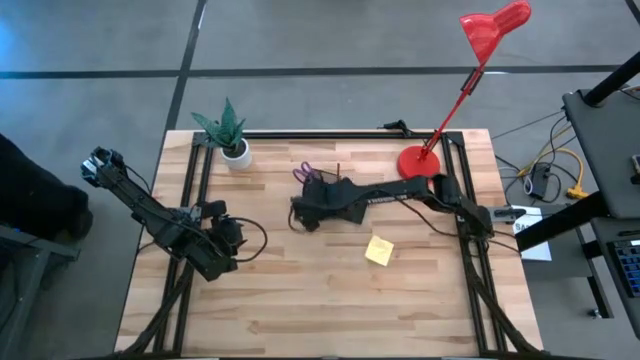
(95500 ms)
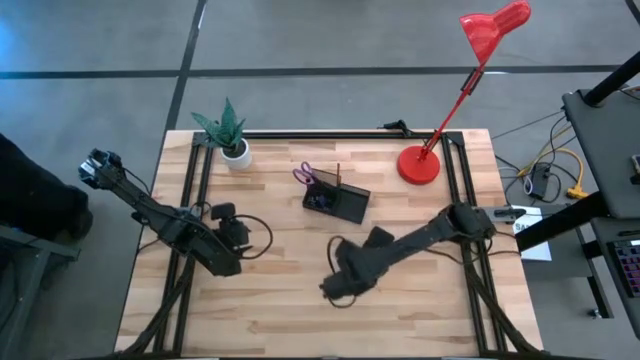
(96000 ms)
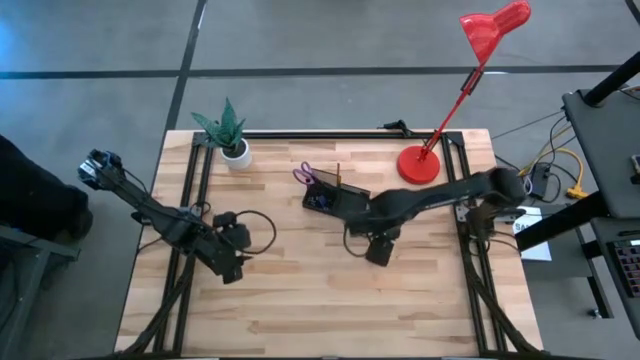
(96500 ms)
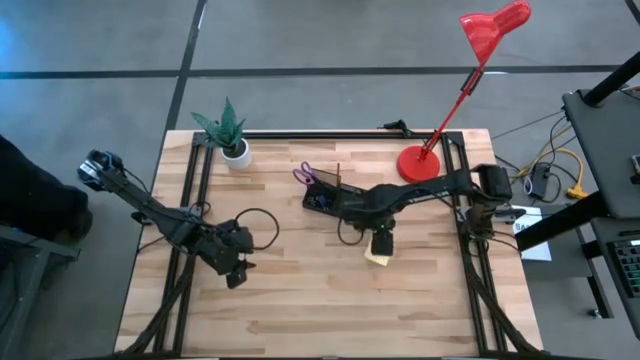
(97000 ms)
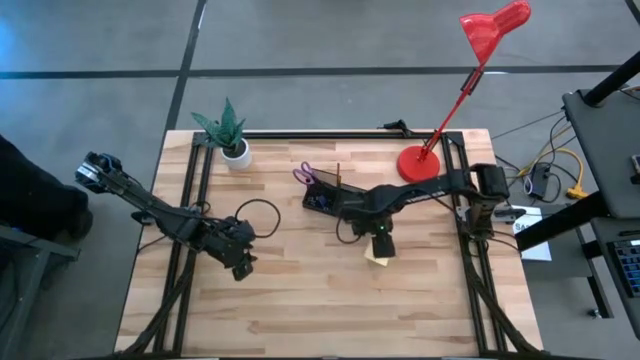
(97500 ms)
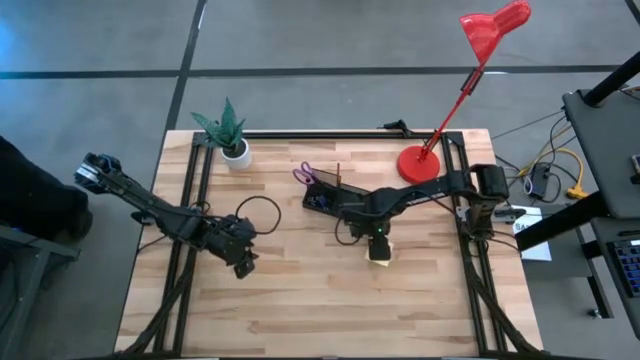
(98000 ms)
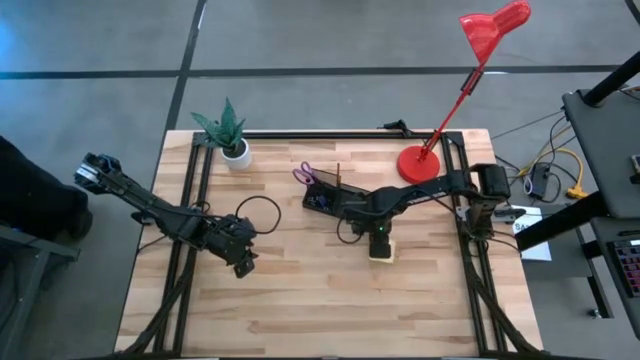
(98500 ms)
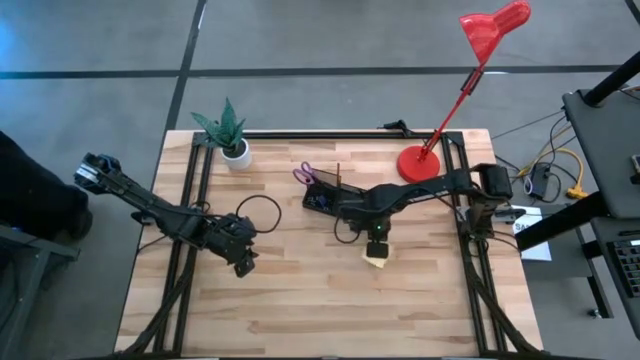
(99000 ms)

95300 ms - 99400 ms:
Task: Pick and place office supplies into organizer
Put the yellow sticky note into the desk organizer

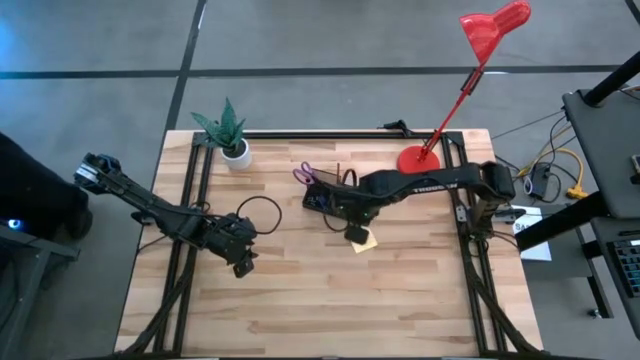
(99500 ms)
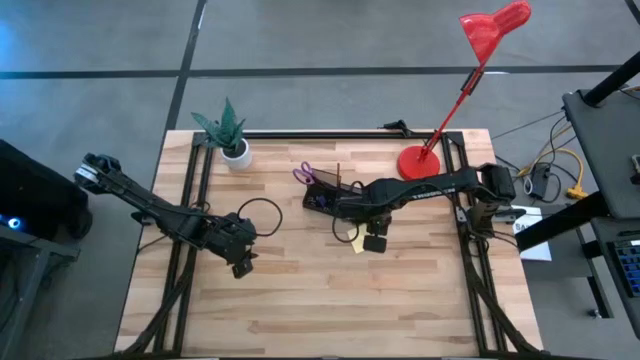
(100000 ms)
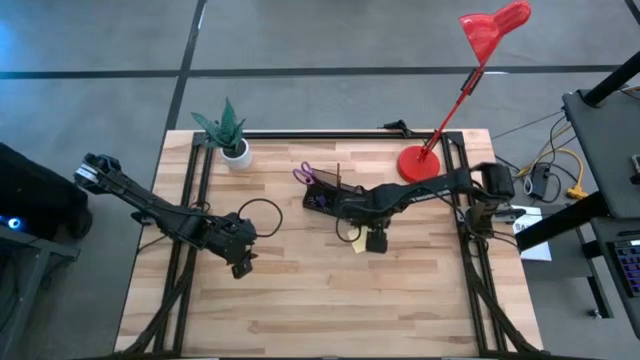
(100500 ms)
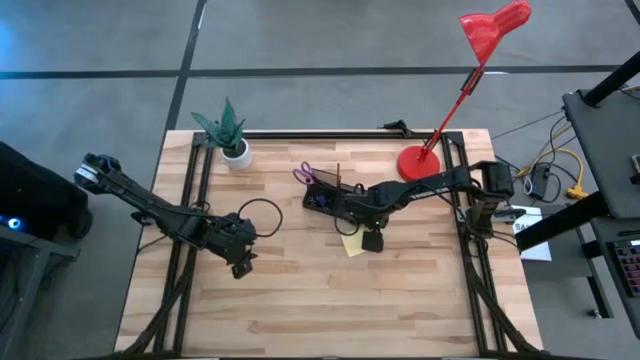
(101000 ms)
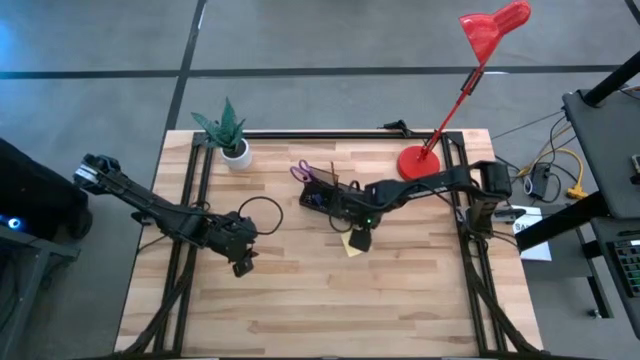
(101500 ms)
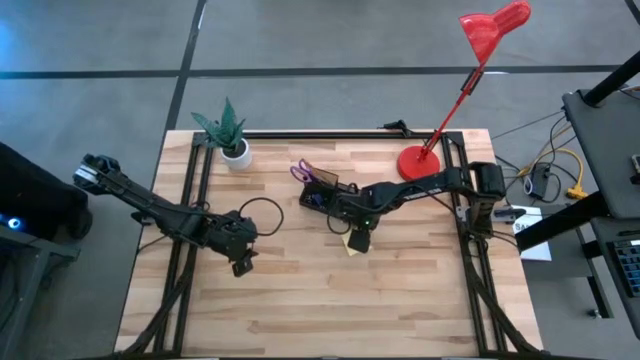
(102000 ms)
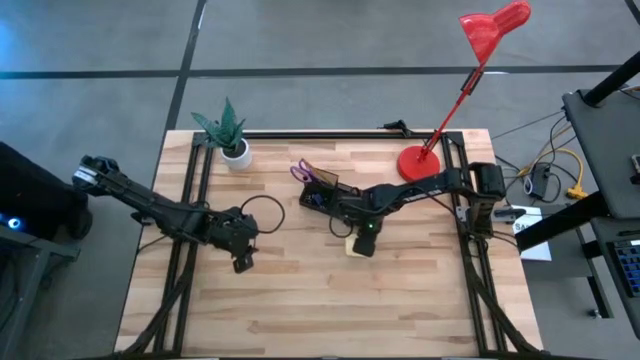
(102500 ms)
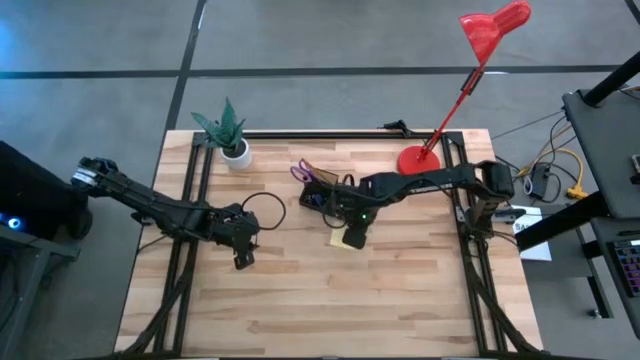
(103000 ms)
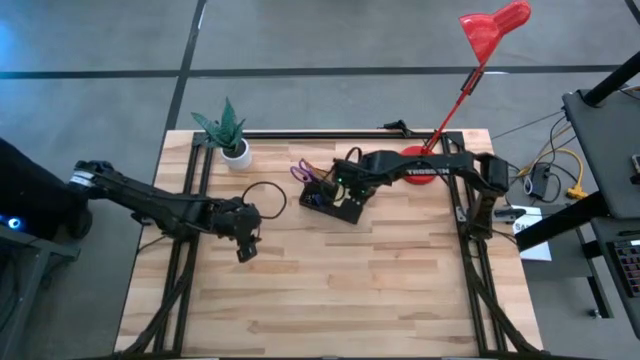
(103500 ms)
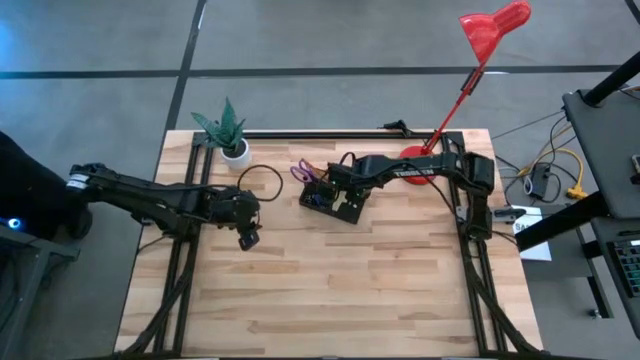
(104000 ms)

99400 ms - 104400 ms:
Put the yellow sticky note into the desk organizer

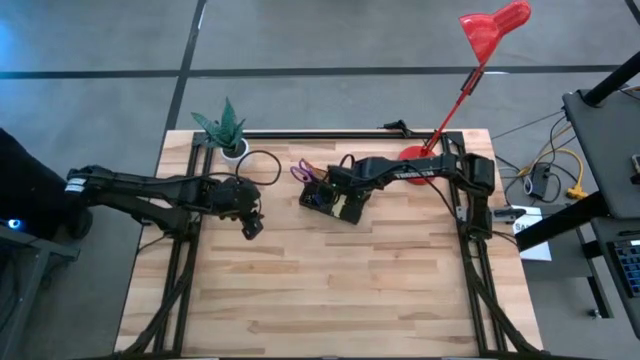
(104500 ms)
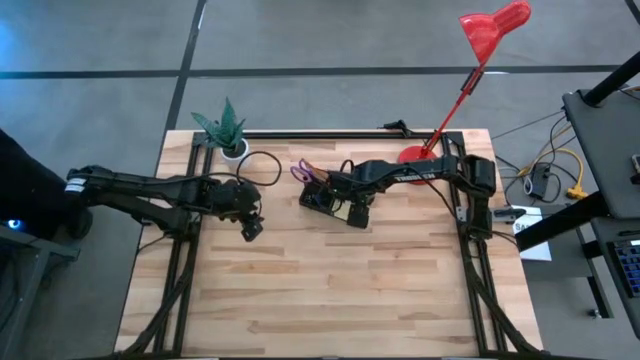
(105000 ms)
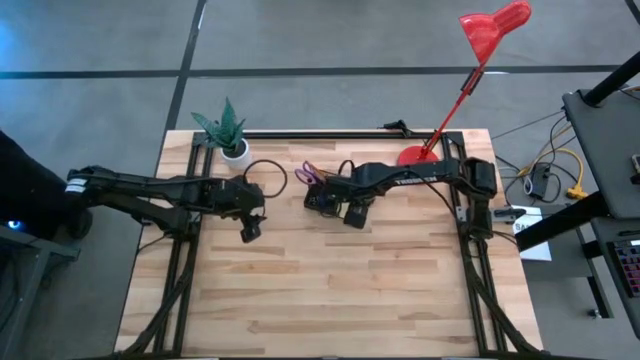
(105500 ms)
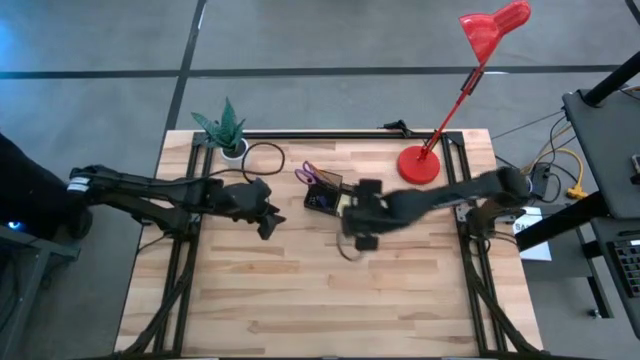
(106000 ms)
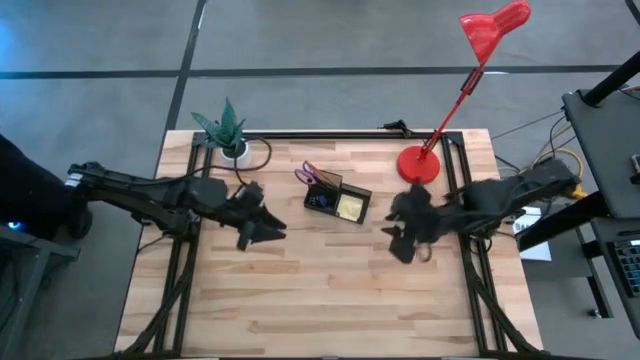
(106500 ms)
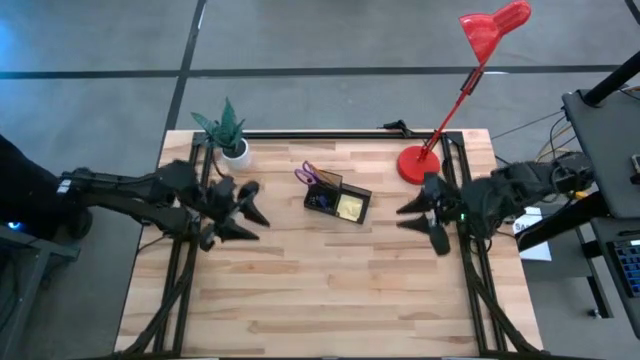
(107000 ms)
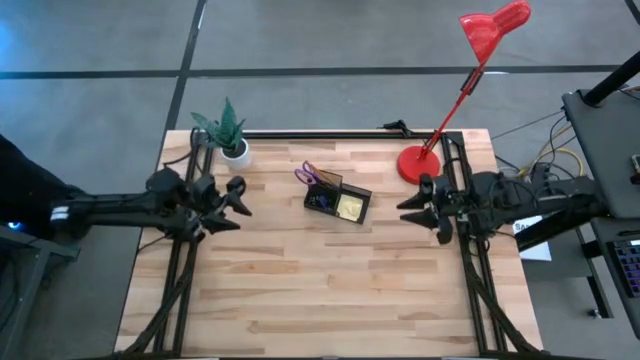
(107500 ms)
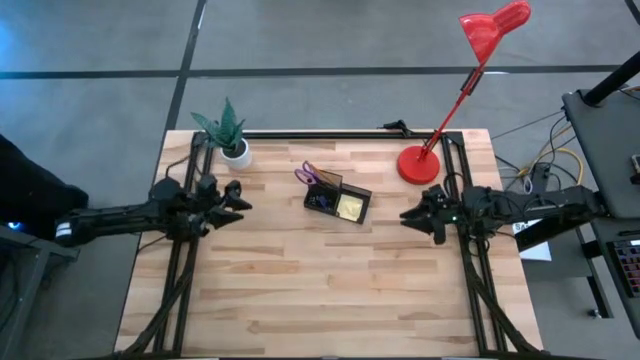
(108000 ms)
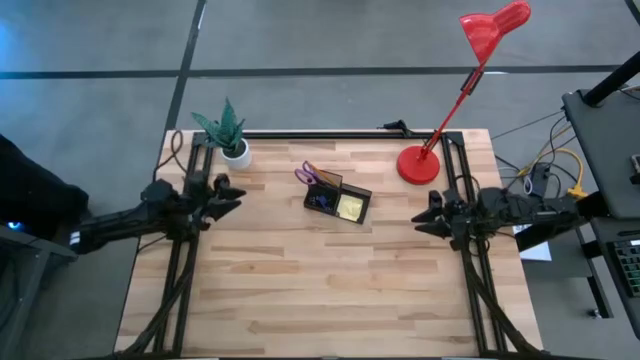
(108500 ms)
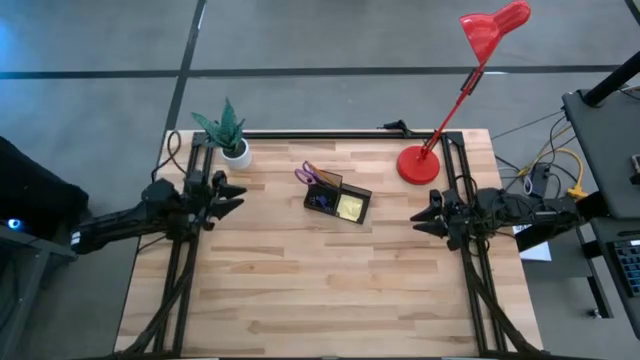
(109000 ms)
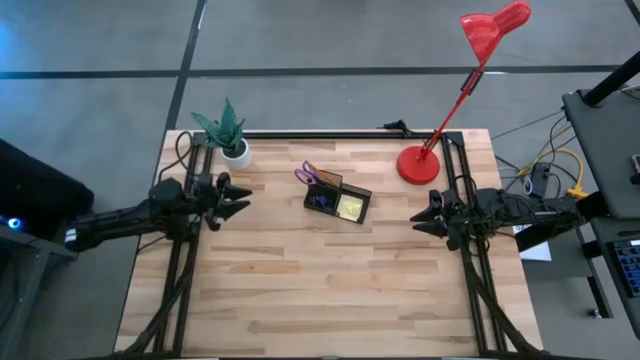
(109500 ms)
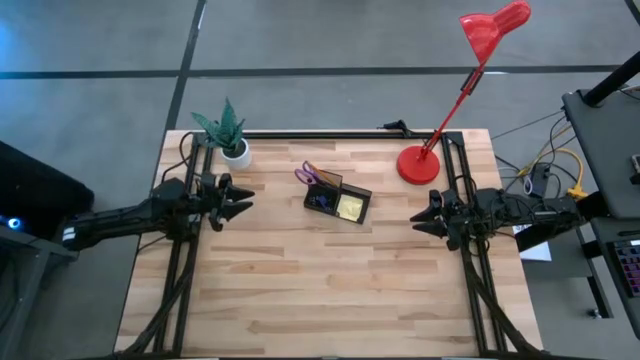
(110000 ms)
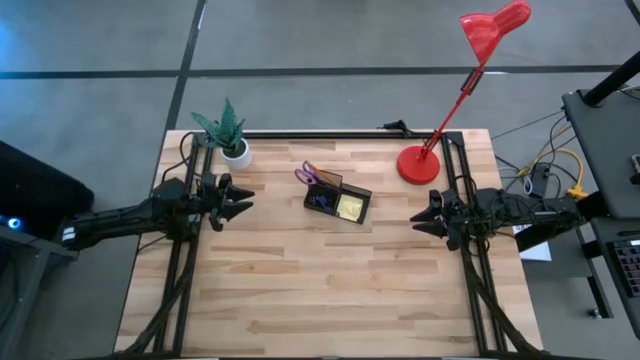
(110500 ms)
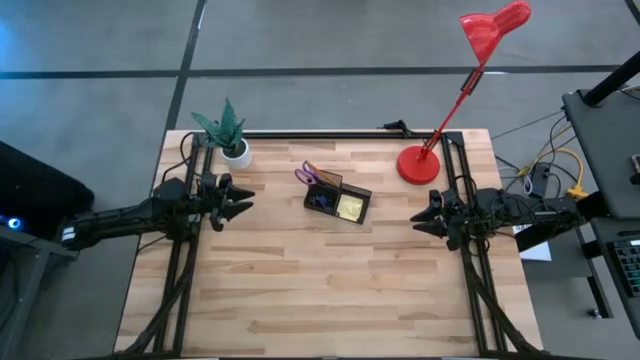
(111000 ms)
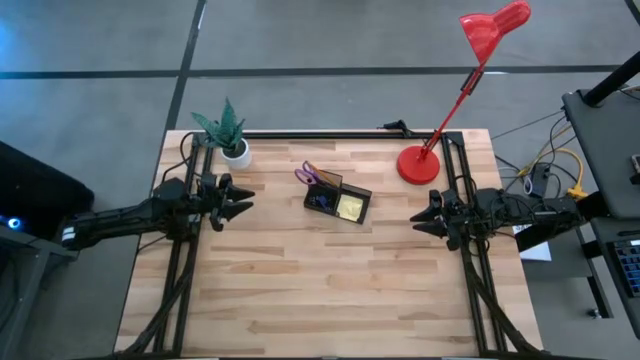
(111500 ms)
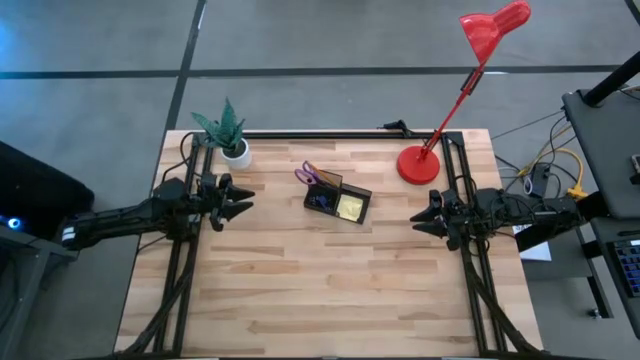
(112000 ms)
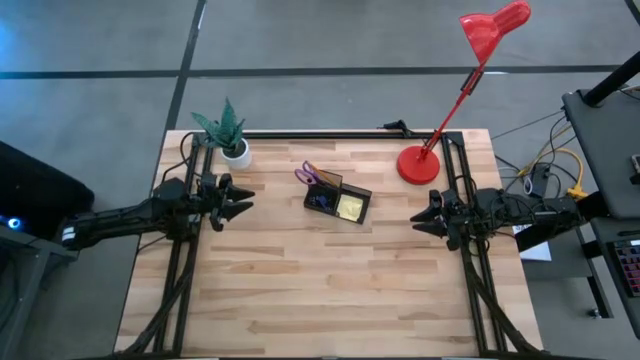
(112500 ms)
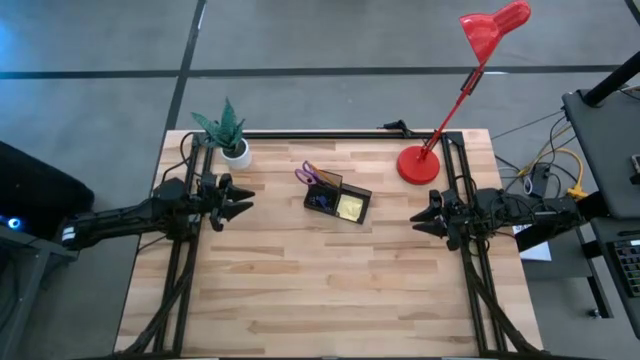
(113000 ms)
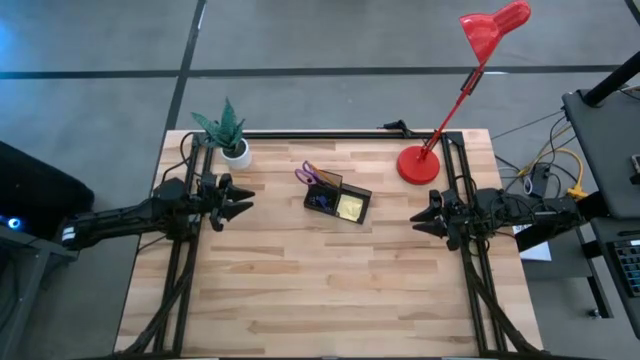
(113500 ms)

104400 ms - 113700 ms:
Return to Home Position

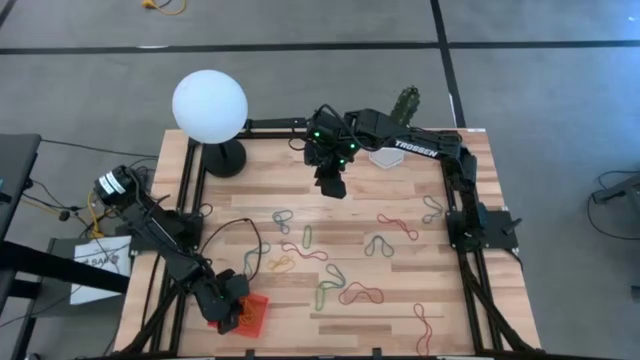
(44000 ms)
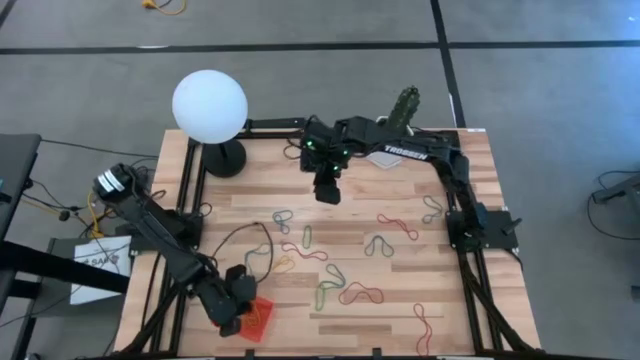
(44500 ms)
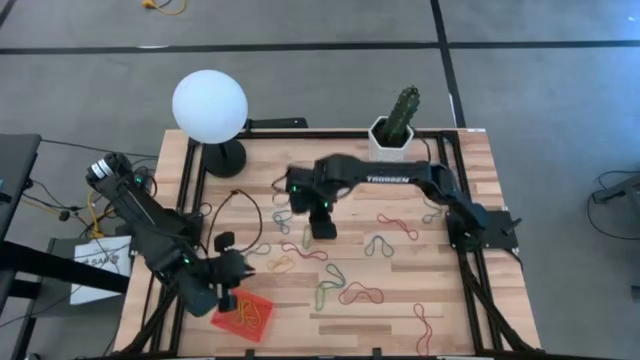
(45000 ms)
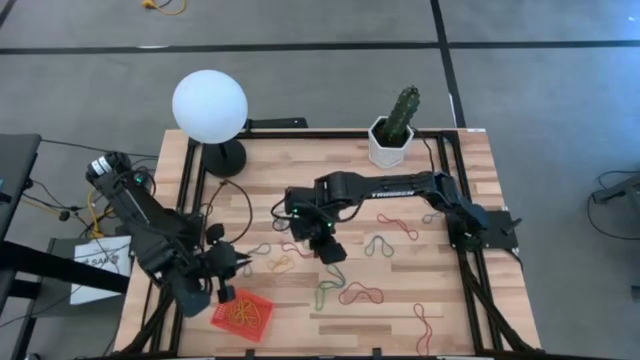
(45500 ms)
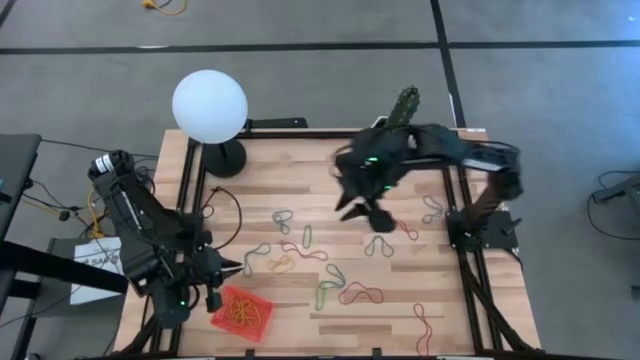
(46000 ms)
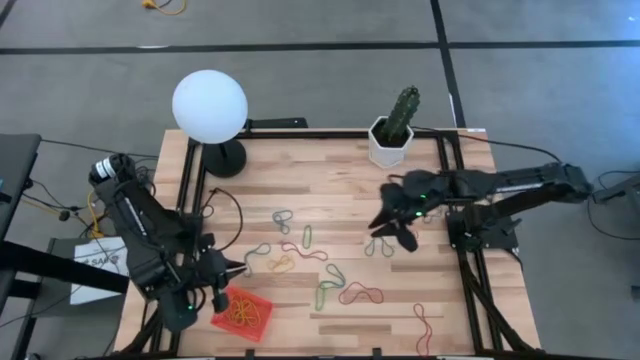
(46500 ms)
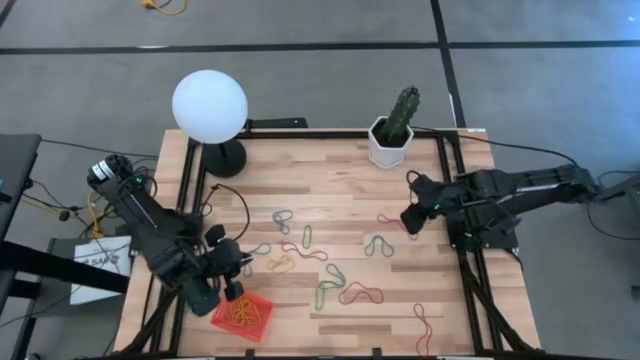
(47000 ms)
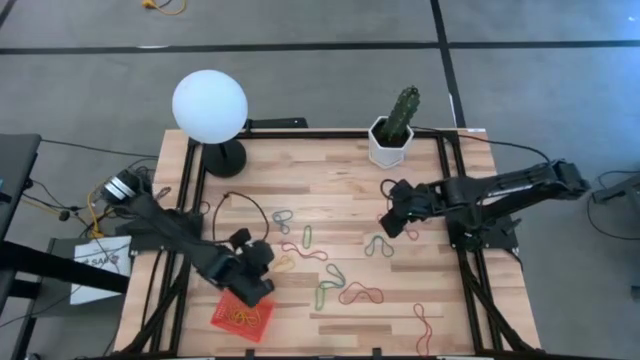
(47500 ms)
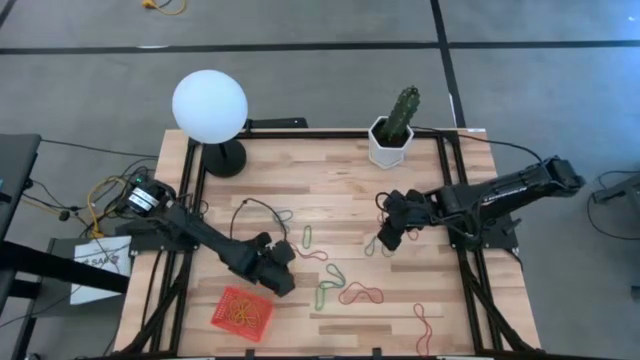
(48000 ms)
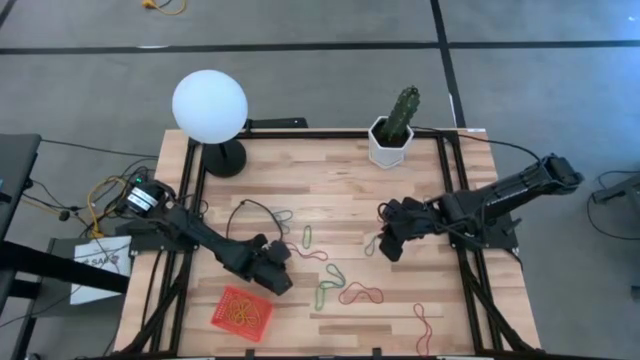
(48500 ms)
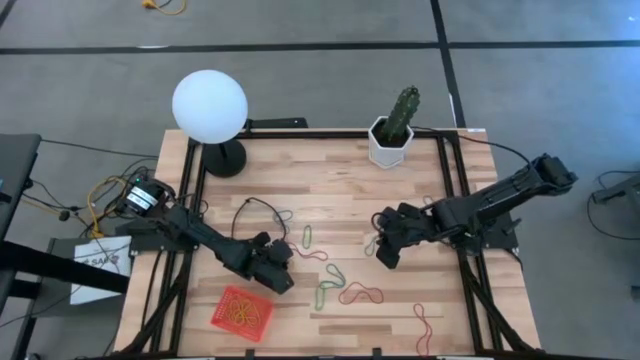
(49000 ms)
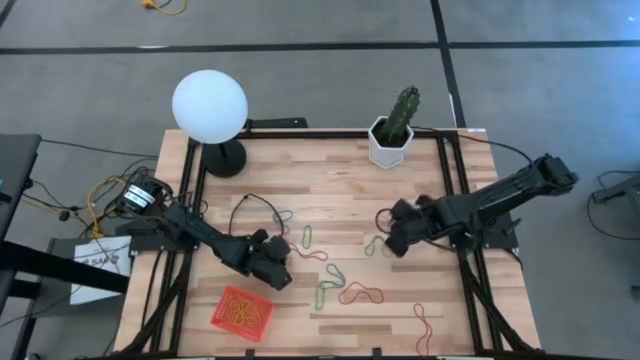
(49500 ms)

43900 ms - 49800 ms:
Task: Pick and place rubber bands into bin
Put the yellow rubber band into the basket
